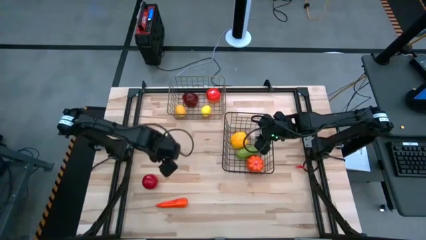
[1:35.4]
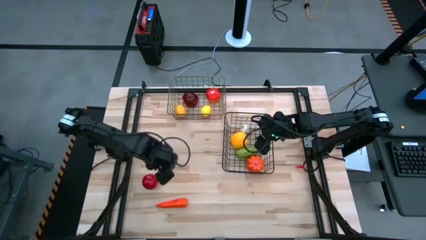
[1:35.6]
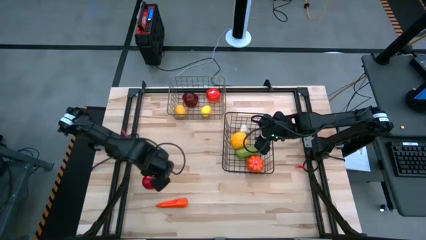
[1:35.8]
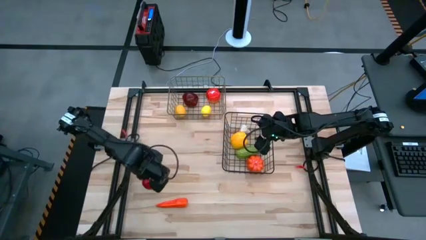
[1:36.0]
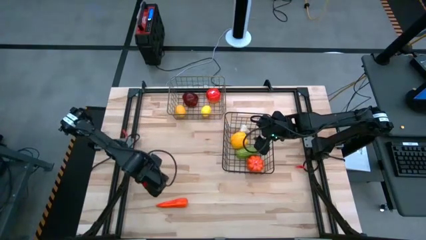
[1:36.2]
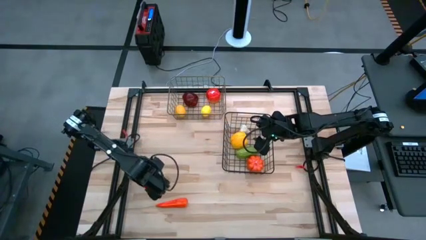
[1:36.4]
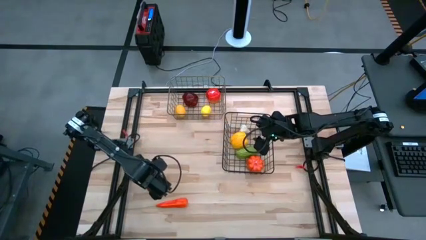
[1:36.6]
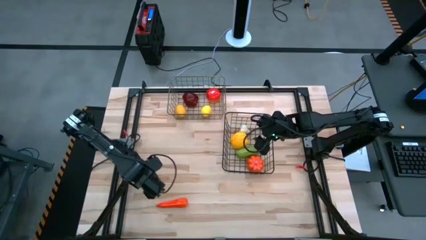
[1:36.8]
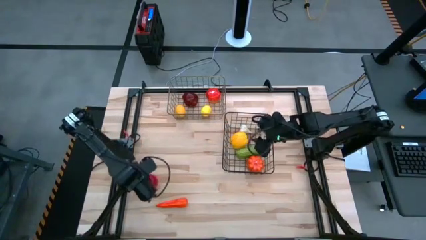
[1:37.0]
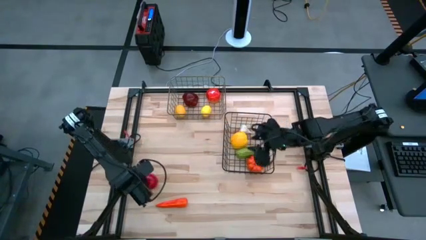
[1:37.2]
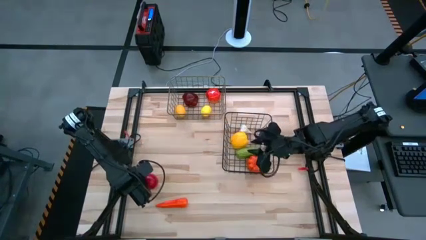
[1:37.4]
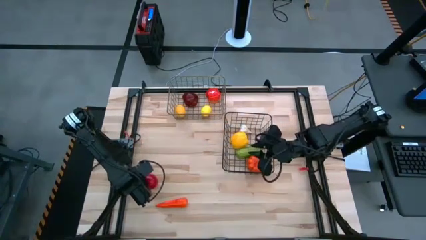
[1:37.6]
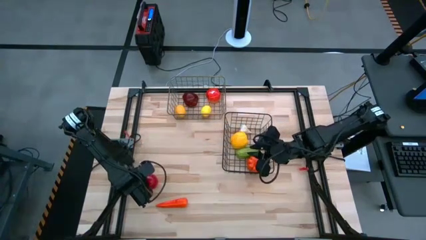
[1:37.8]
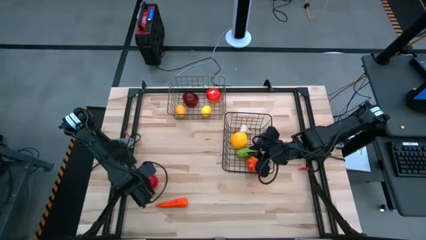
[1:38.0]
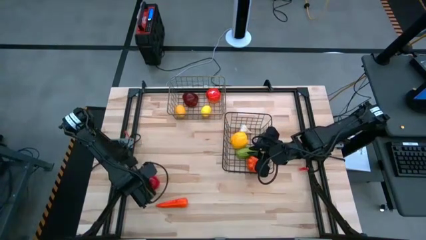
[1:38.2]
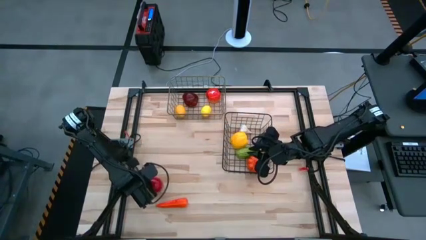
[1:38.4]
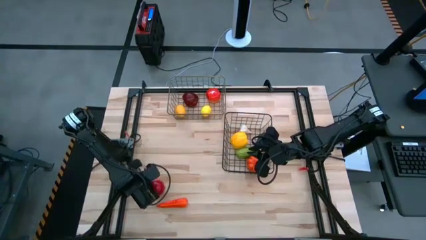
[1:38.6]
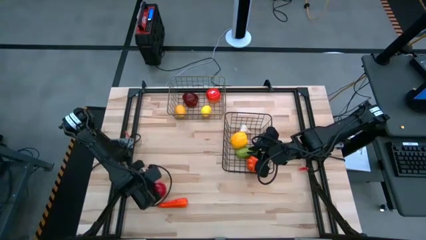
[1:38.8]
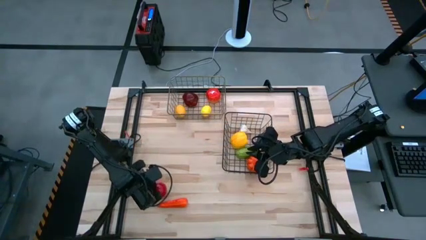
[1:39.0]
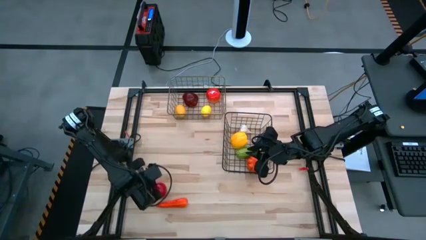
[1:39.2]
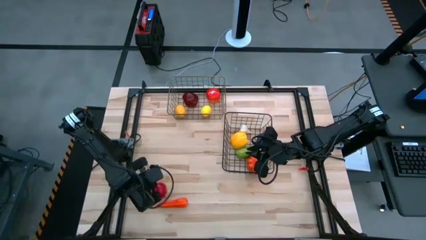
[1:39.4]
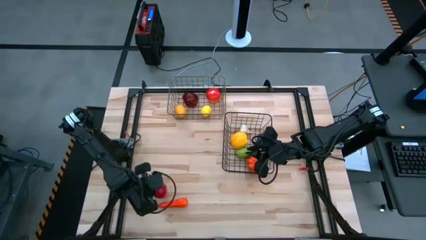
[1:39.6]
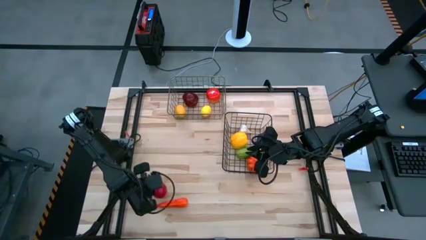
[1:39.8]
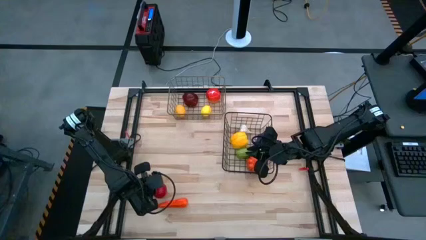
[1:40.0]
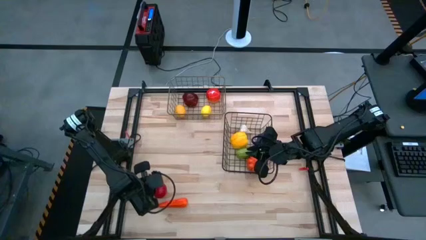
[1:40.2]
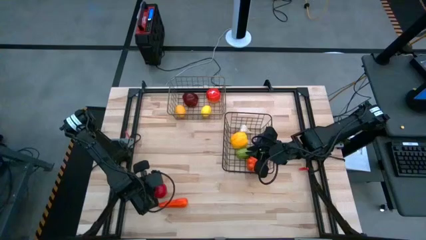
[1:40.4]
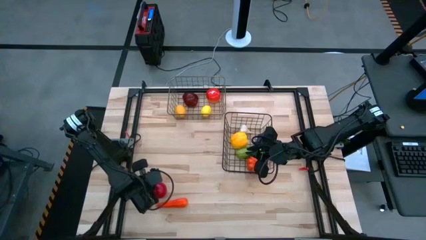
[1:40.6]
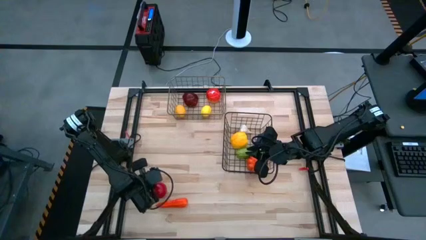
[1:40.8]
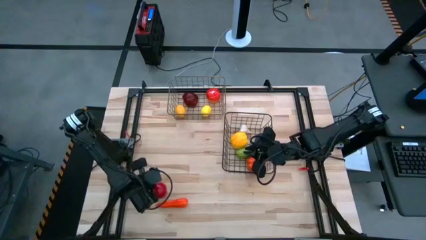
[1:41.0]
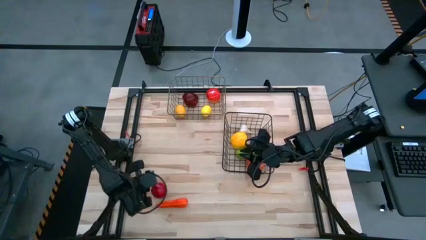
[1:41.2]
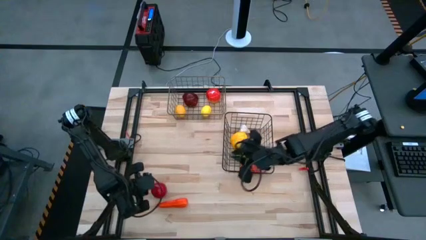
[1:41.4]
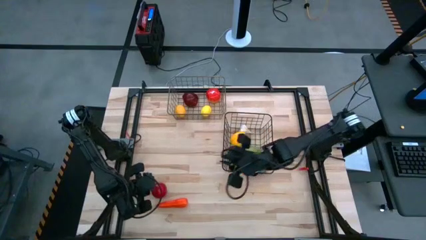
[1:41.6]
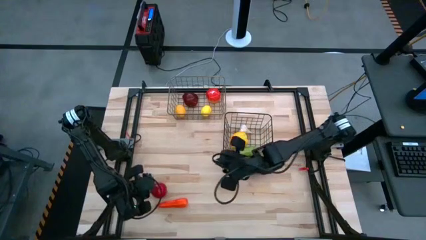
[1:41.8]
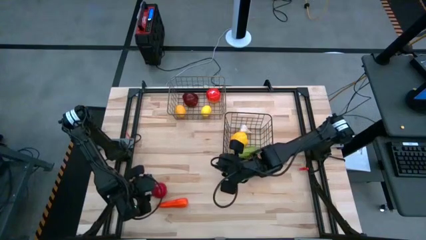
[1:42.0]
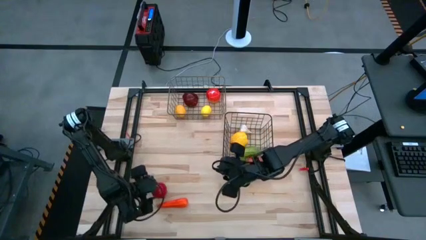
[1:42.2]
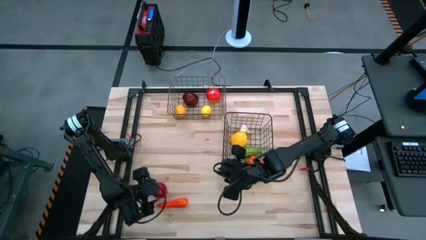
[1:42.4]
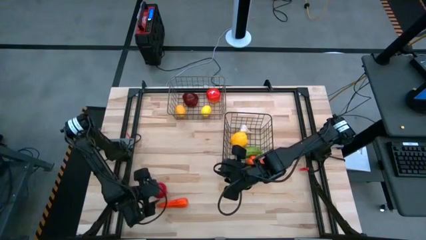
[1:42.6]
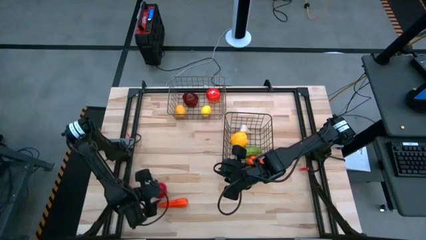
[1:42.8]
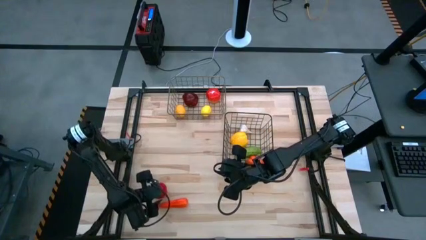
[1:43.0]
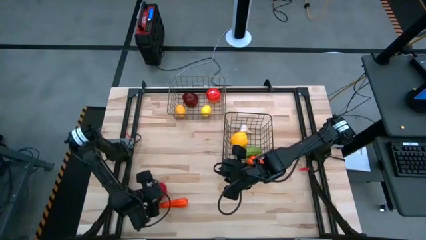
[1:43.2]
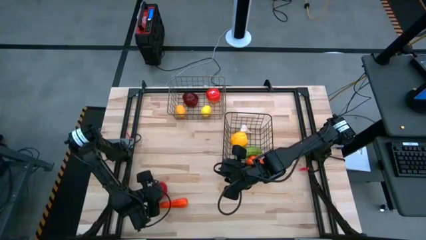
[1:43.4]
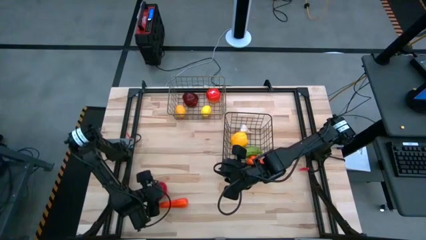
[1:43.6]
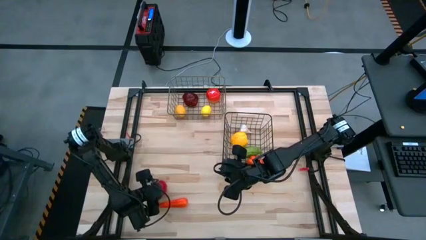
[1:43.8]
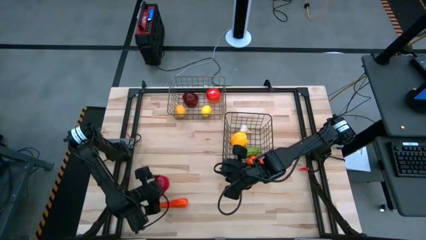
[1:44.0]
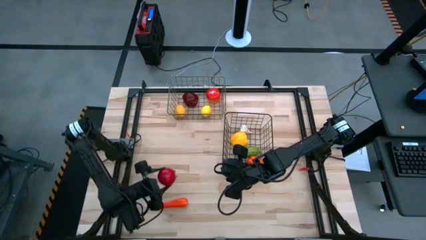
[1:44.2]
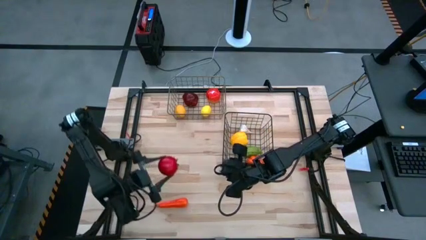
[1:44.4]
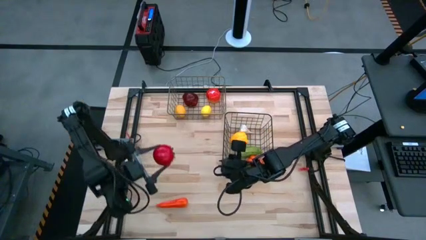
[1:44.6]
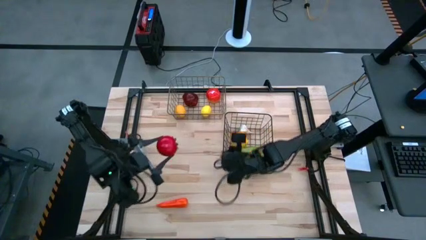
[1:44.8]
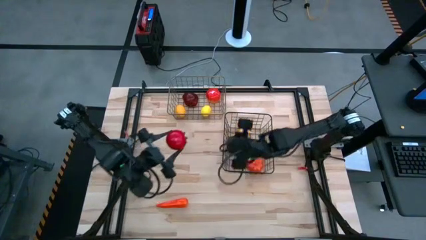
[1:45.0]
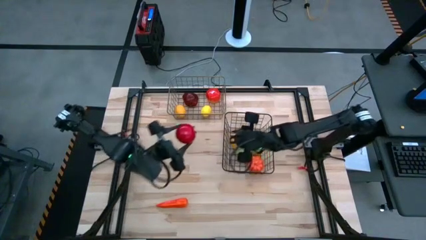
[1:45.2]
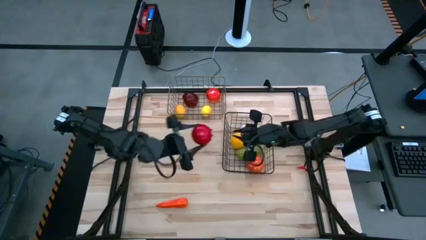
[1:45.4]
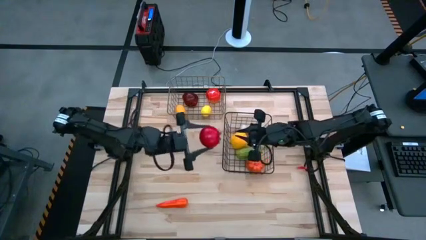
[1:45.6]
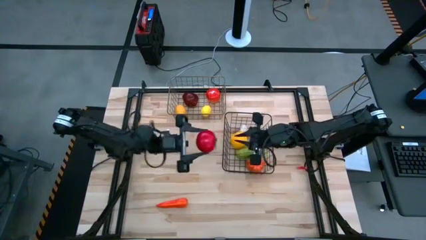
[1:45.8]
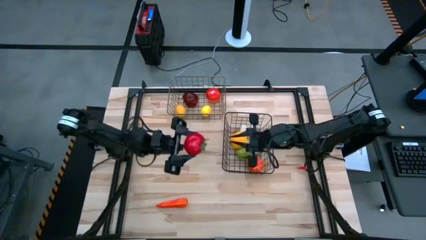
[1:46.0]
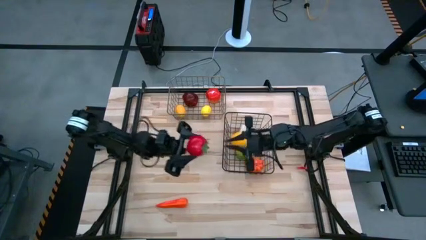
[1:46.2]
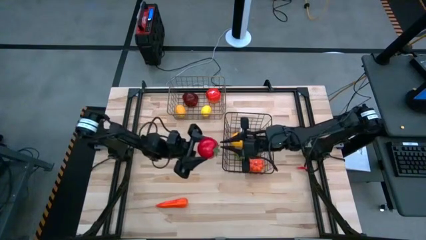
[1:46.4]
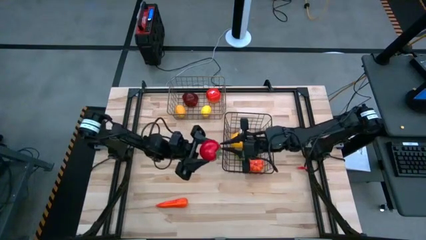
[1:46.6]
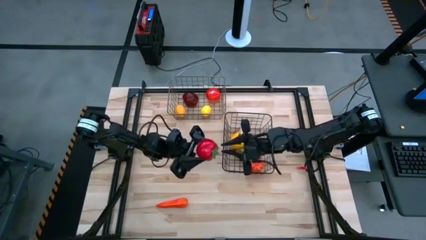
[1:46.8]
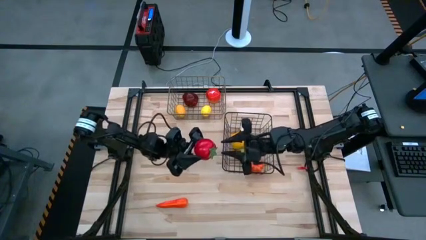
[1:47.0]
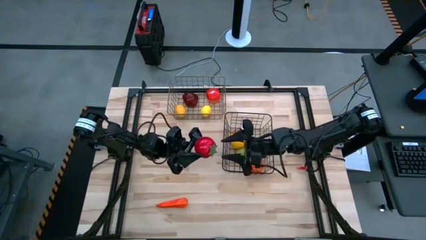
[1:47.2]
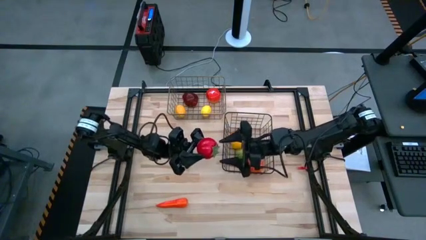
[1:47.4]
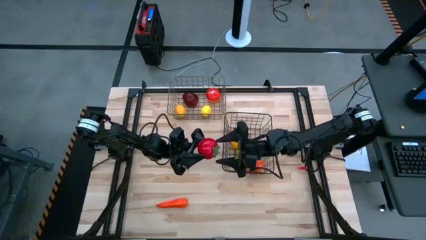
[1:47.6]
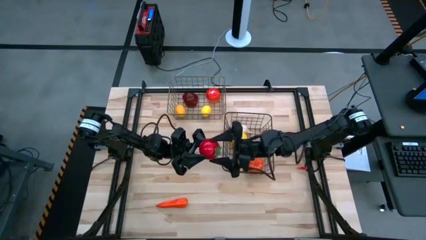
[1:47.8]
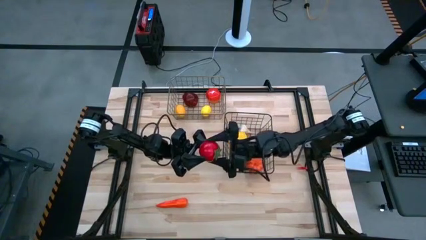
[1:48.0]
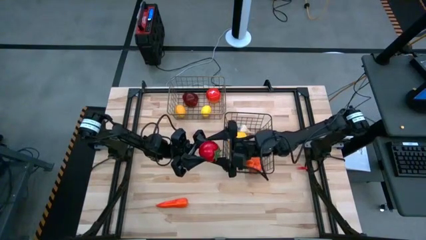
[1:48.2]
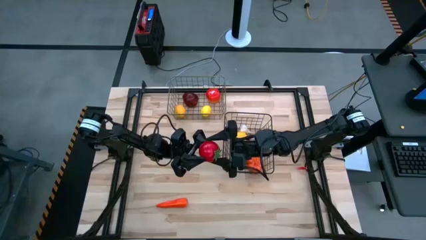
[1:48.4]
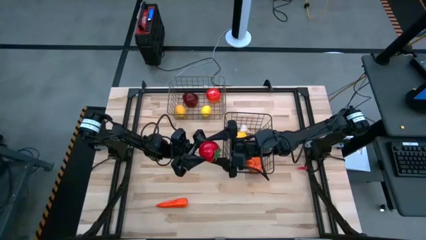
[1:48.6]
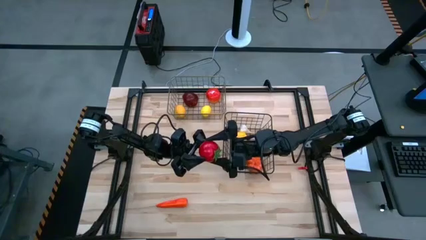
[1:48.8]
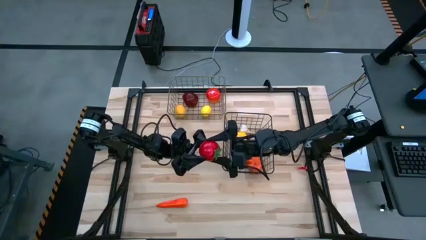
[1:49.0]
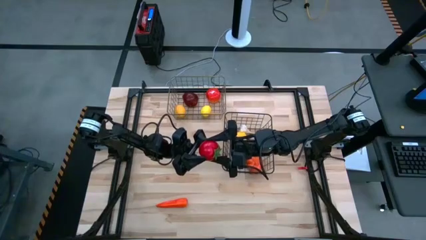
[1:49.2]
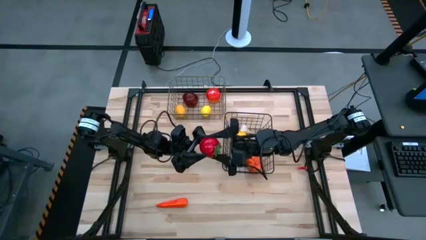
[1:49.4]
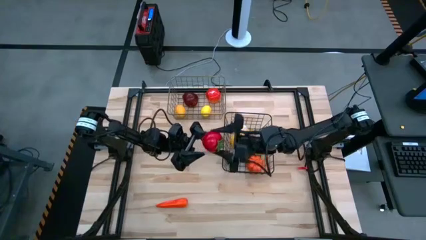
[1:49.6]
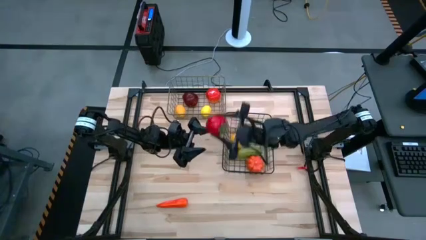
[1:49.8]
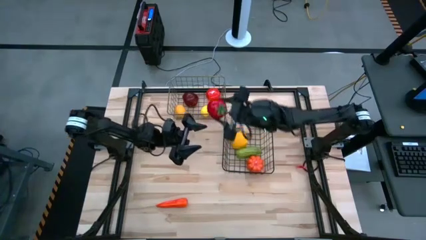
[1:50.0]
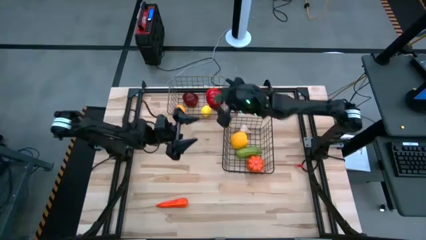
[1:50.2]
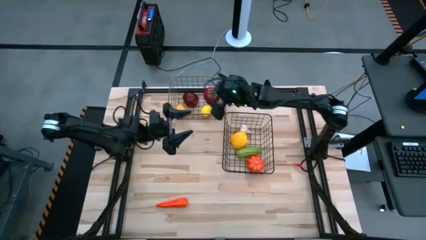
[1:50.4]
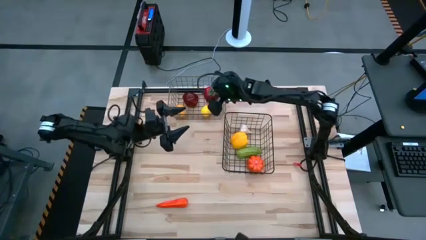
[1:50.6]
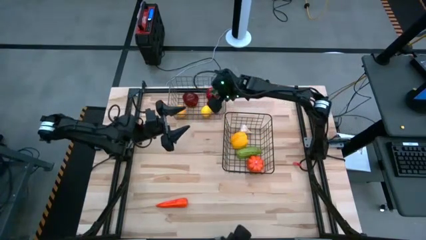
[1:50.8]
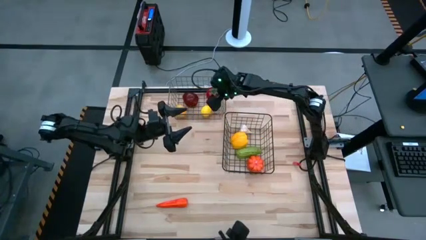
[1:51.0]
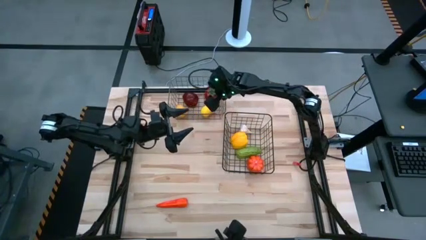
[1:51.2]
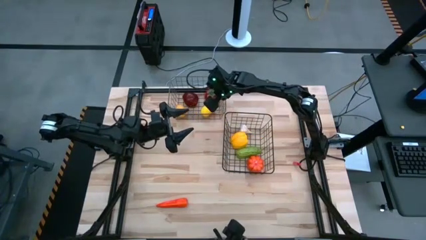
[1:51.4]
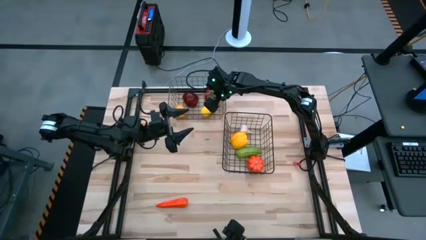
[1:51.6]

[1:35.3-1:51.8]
Task: Sort produce into baskets
Put the red tomato into the silver wire basket
